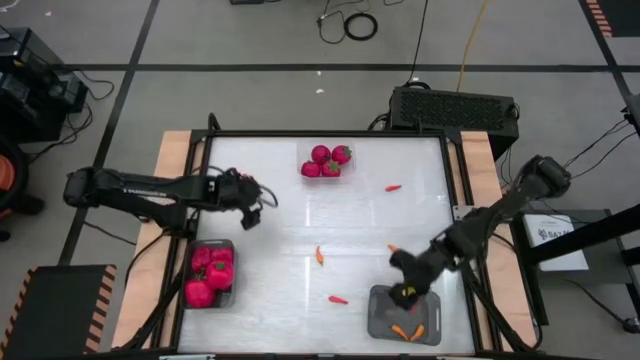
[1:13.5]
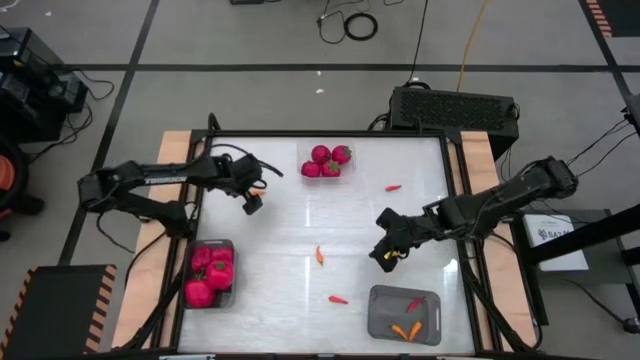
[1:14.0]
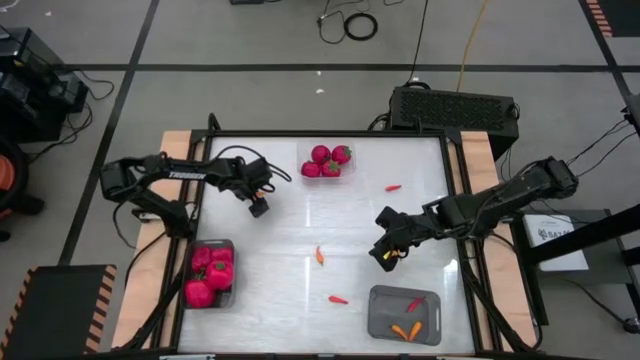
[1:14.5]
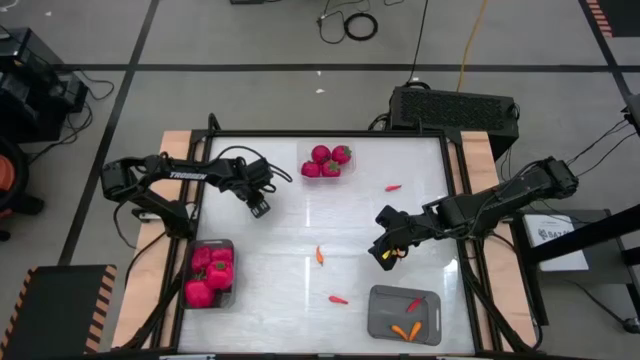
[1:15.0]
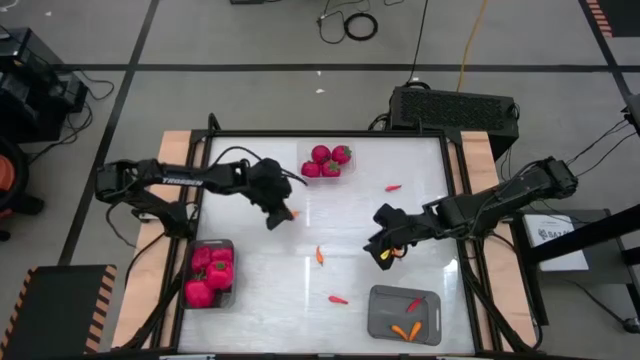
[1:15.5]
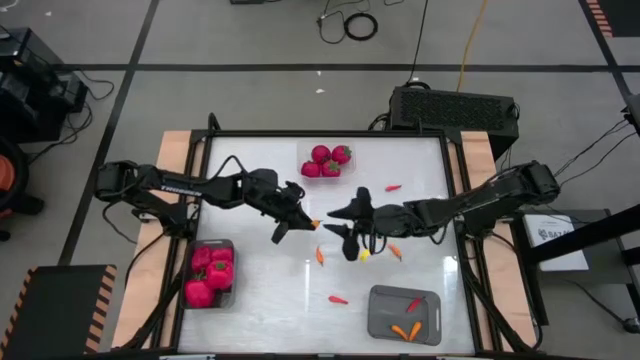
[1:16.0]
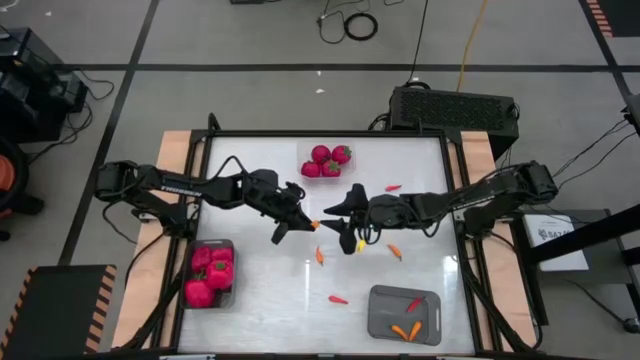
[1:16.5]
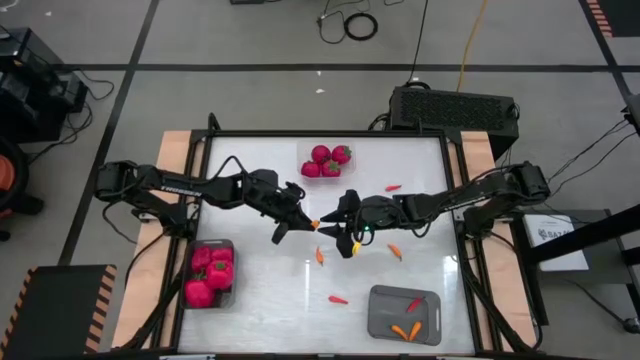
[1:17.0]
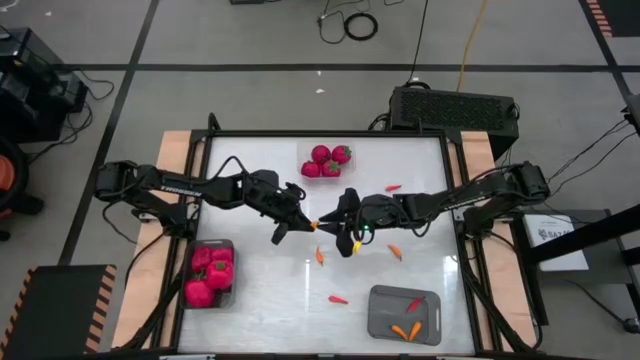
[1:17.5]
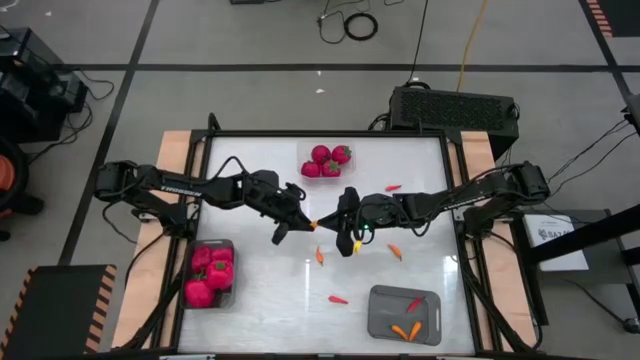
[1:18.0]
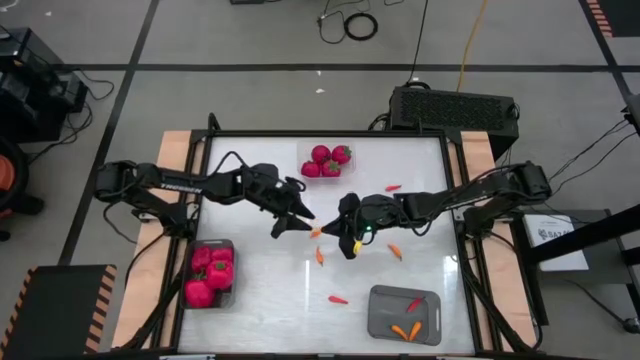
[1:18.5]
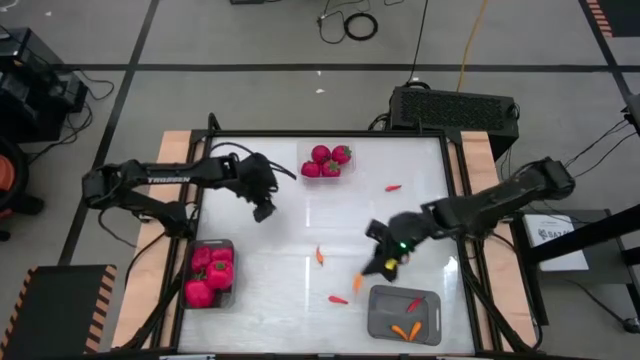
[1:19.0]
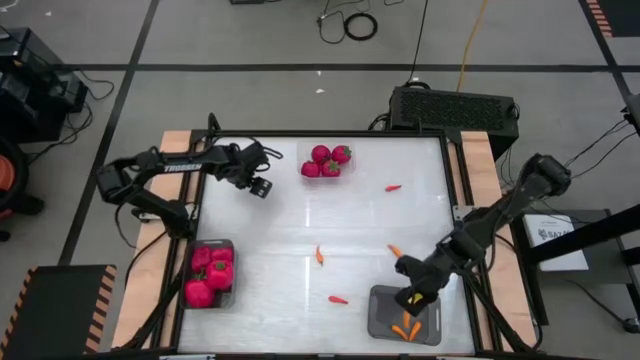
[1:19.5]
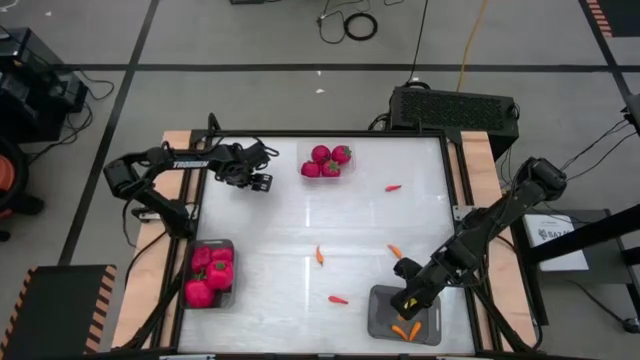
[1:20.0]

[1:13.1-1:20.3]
Task: Sort produce into baskets
Put the orange chili pepper into the right black bin

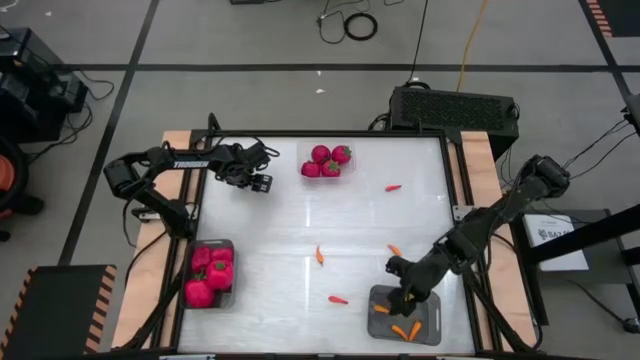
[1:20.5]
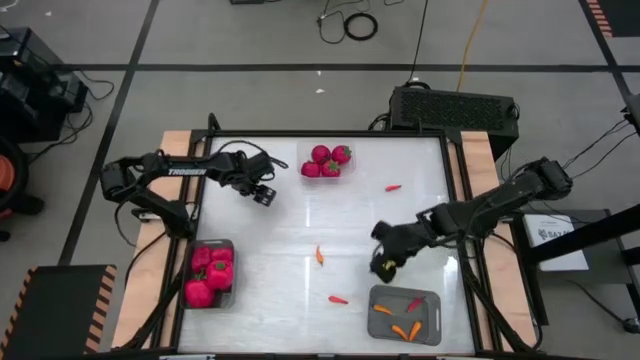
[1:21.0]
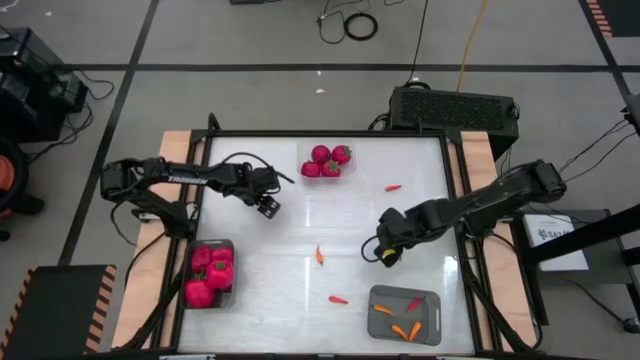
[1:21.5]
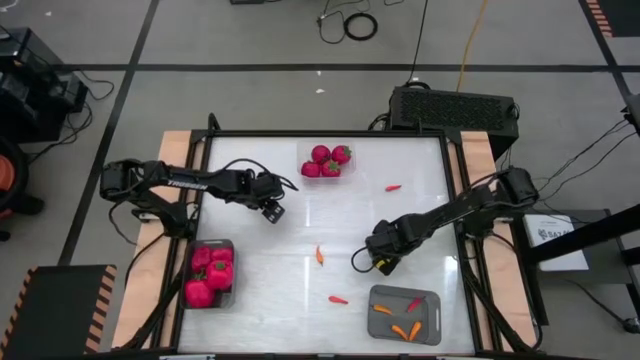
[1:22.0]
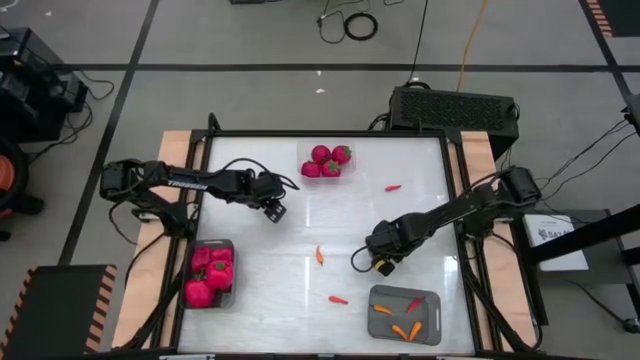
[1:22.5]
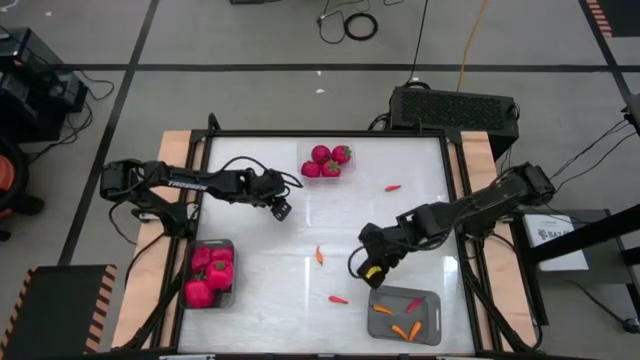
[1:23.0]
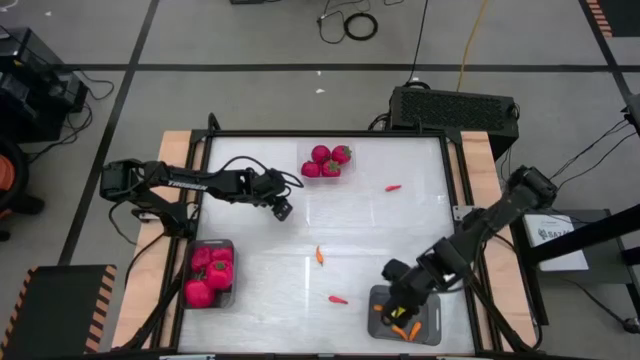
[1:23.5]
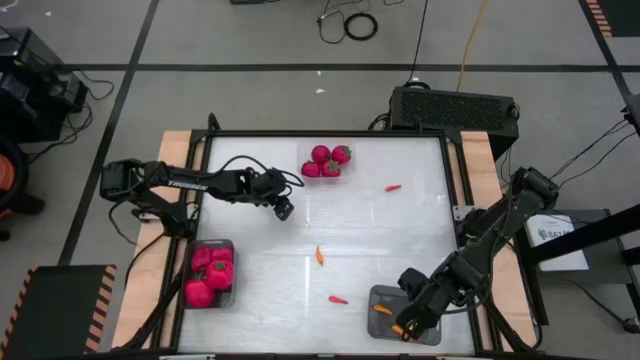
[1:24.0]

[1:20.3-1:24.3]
Put the orange chili pepper into the right black bin

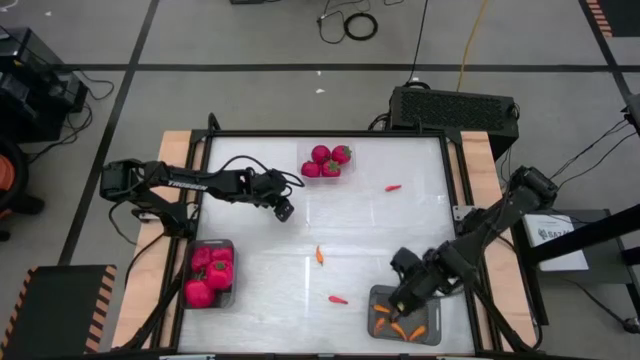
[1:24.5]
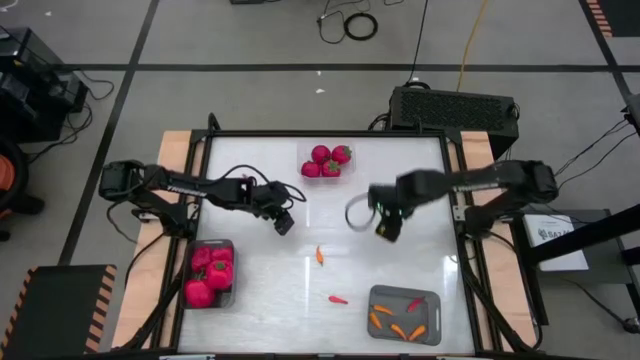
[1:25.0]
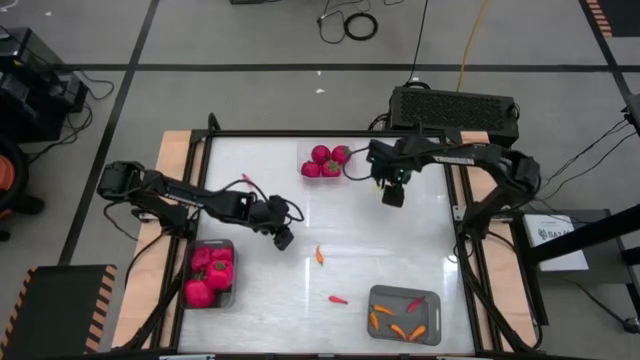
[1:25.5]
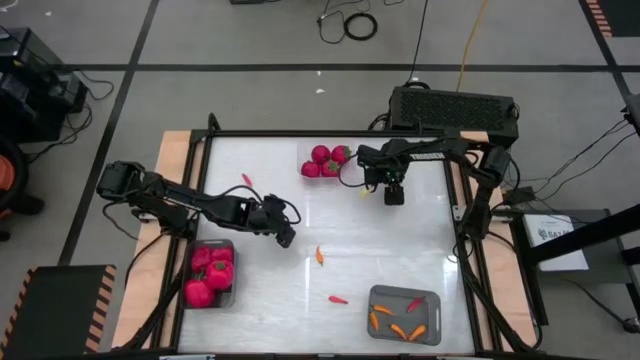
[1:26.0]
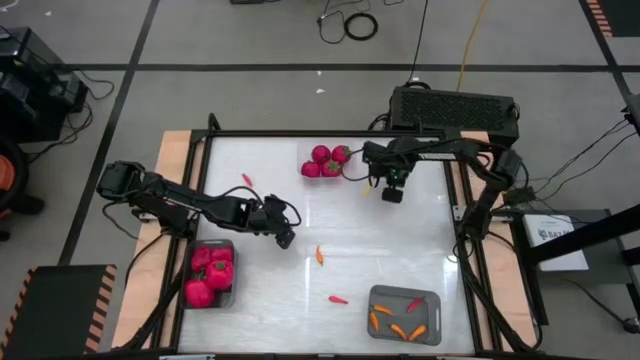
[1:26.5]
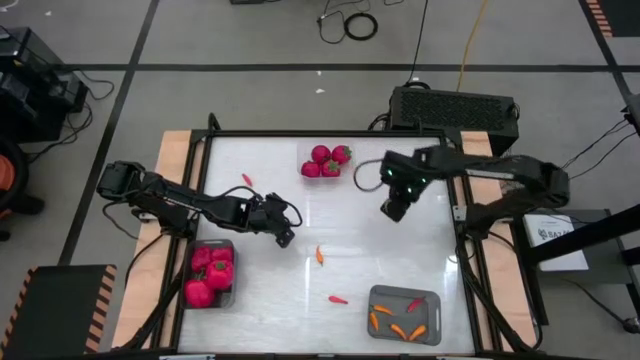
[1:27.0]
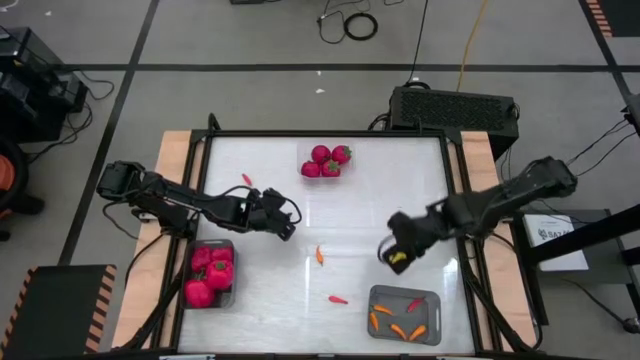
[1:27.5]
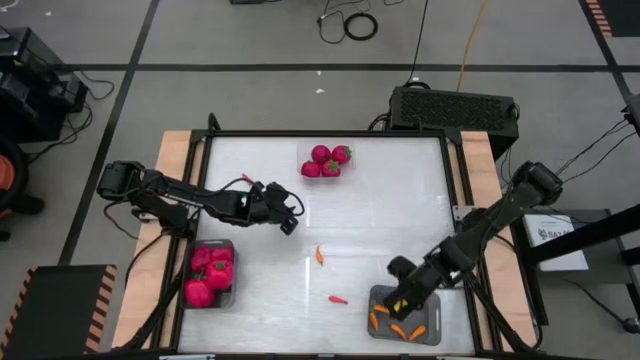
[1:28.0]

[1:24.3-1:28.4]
Put the orange chili pepper into the right black bin

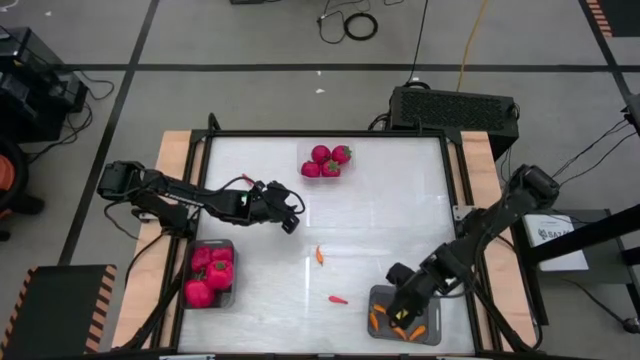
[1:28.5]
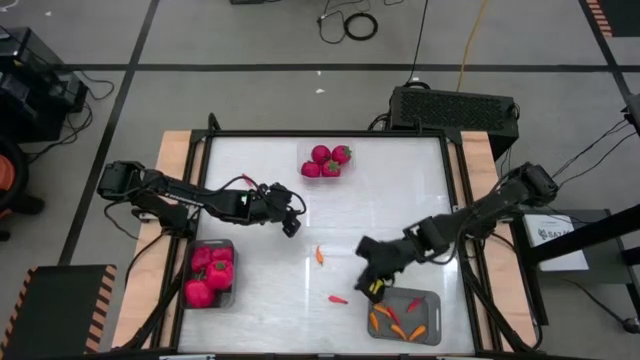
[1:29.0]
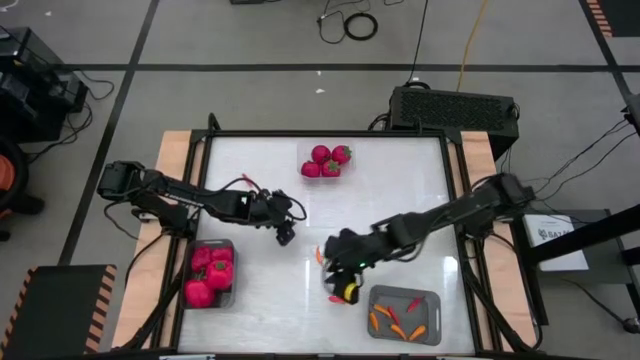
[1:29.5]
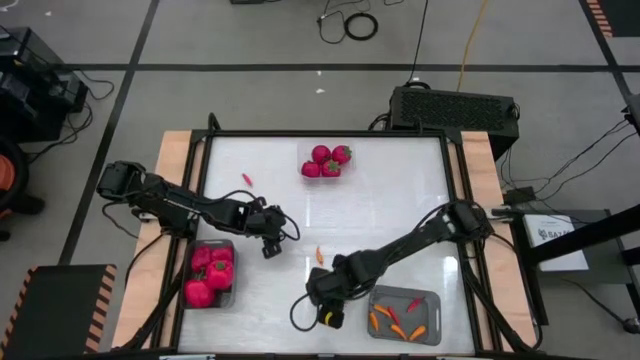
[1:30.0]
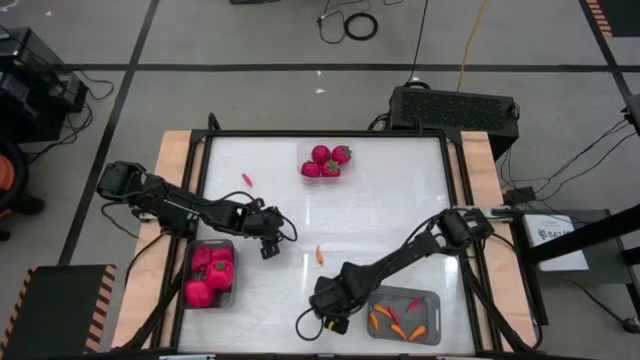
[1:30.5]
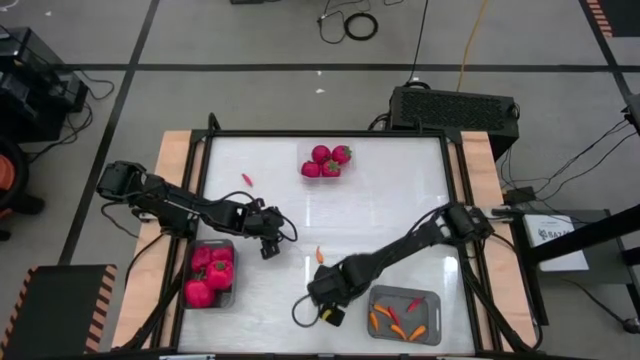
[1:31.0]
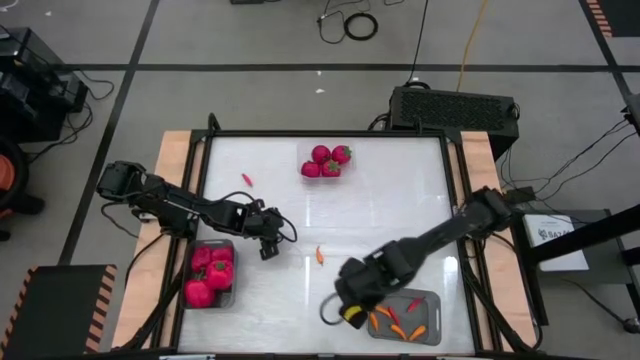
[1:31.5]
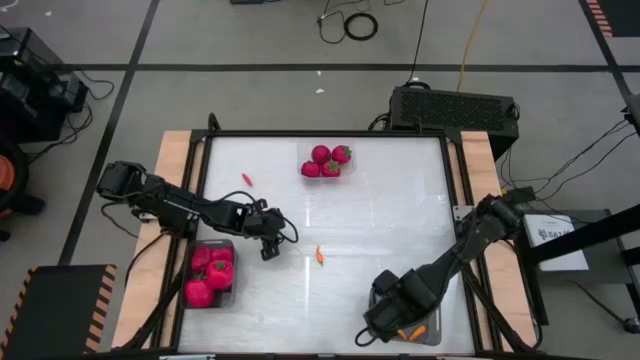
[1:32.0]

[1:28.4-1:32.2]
Put the red chili pepper into the right black bin

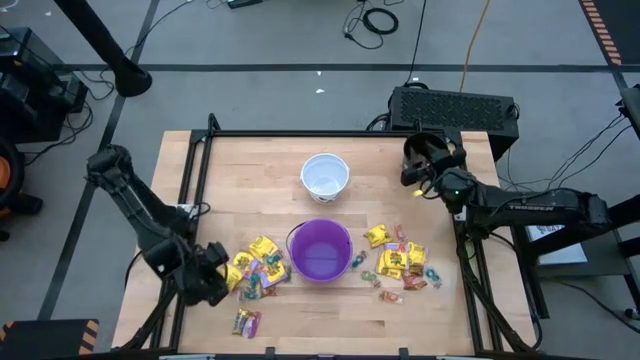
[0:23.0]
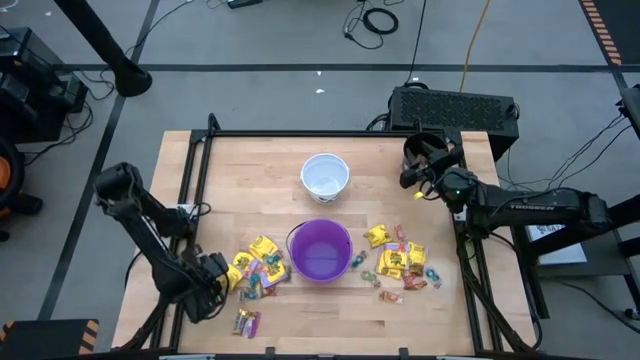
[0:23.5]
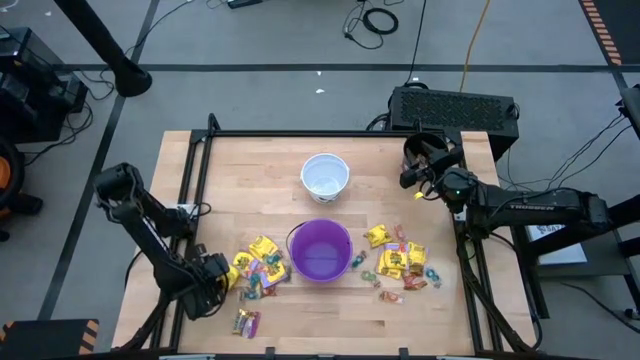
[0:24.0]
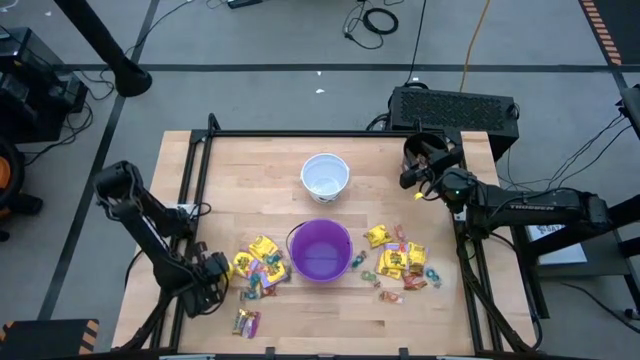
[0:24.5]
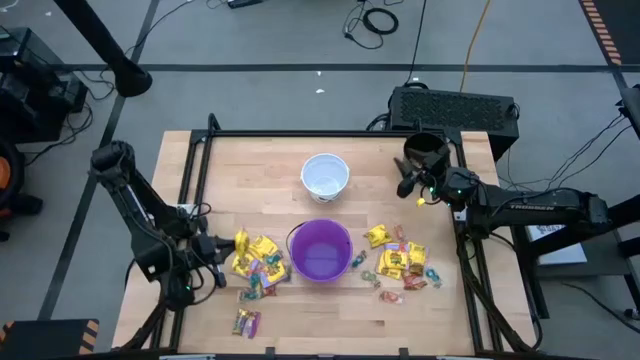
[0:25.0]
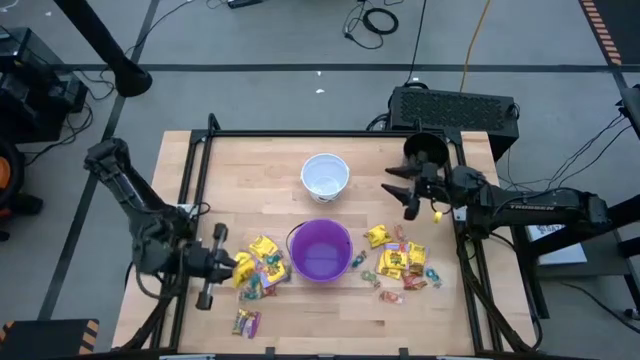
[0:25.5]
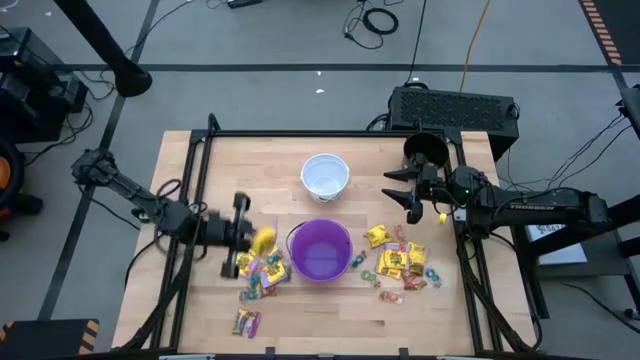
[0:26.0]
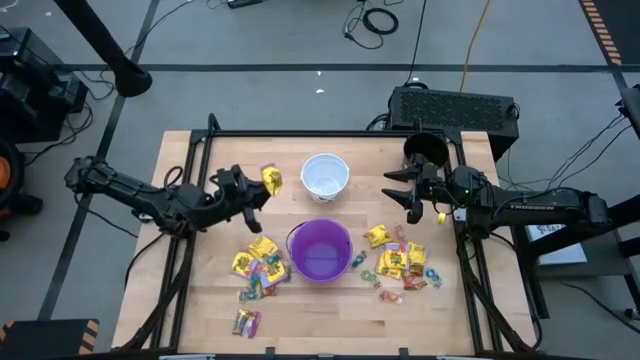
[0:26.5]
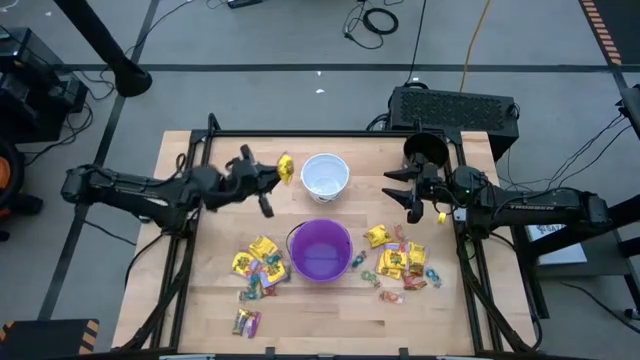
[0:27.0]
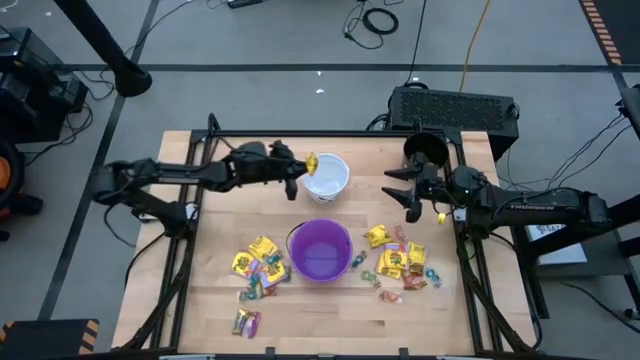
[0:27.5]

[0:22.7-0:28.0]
Task: Sort candy by brand, put in halloween buckets
Put the yellow candy into the white bucket
